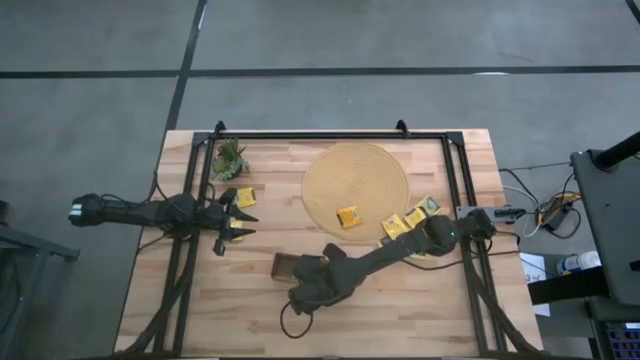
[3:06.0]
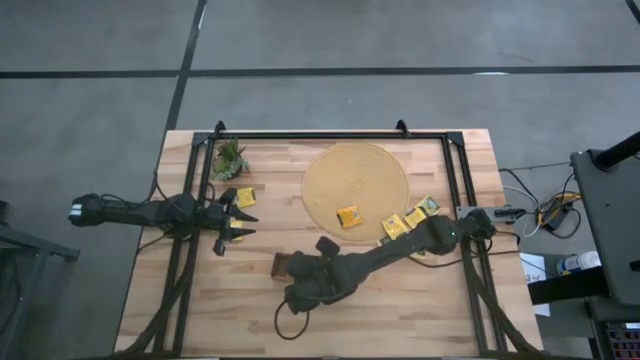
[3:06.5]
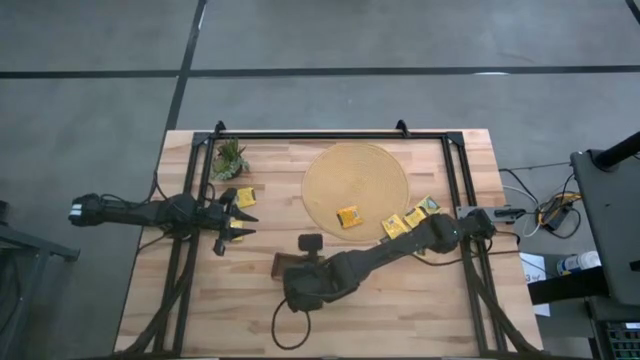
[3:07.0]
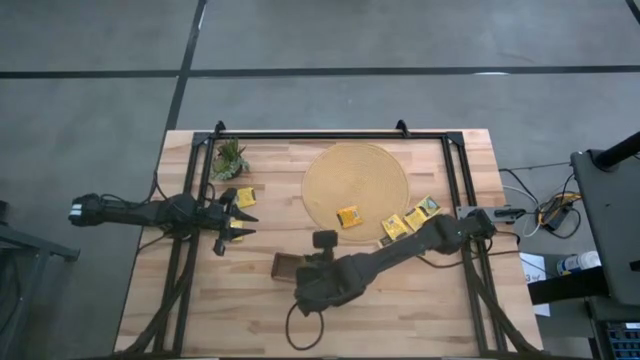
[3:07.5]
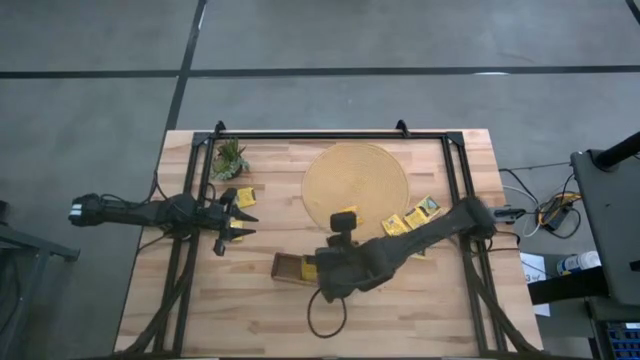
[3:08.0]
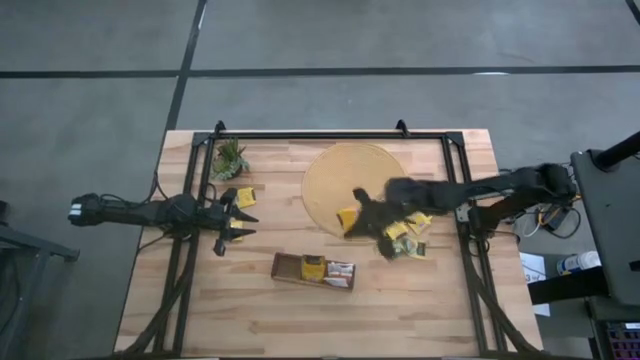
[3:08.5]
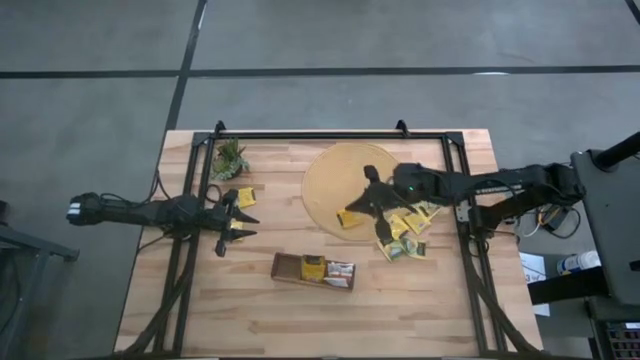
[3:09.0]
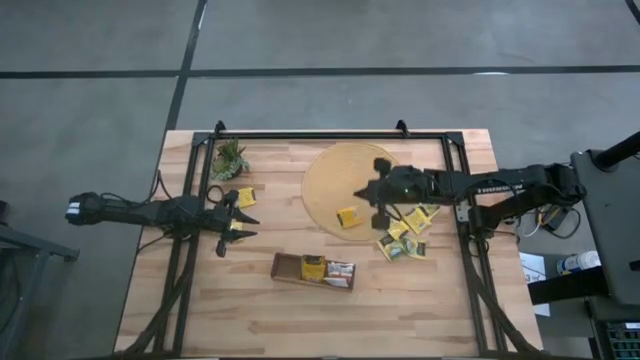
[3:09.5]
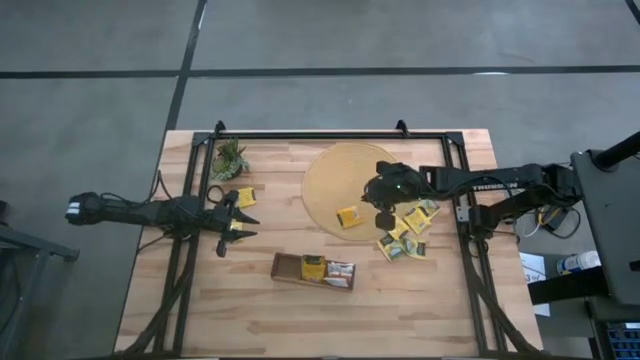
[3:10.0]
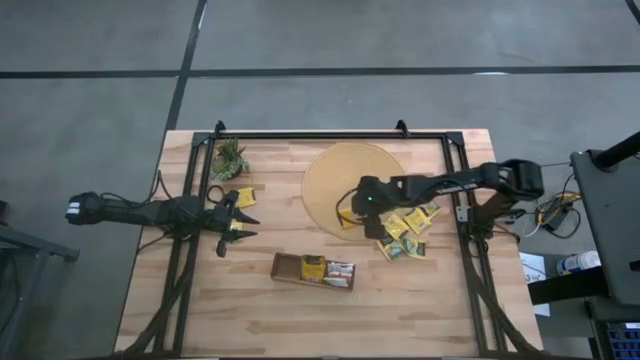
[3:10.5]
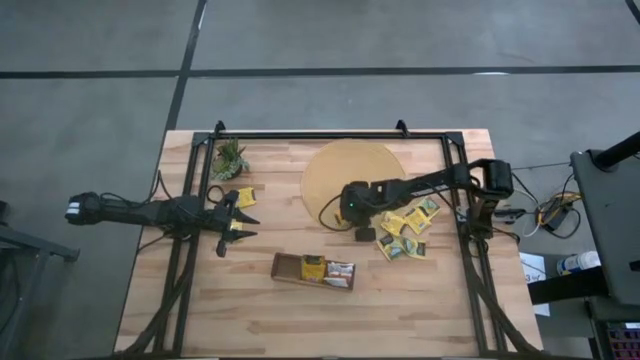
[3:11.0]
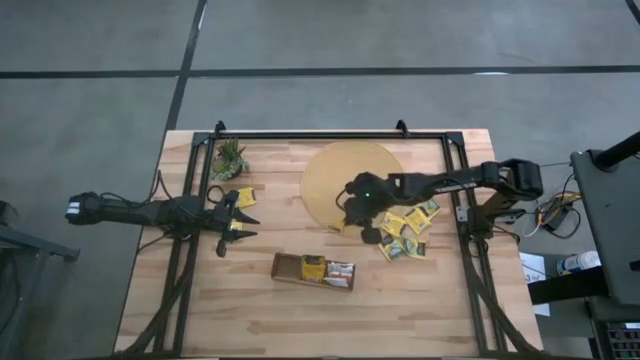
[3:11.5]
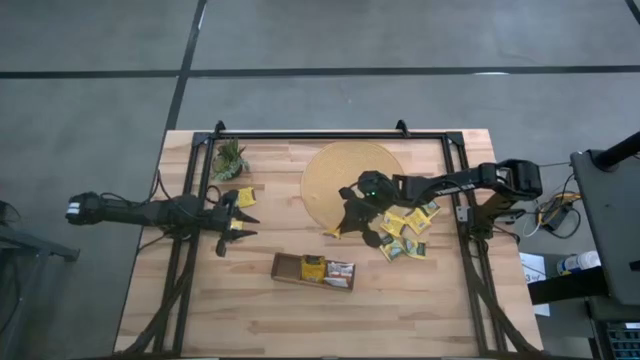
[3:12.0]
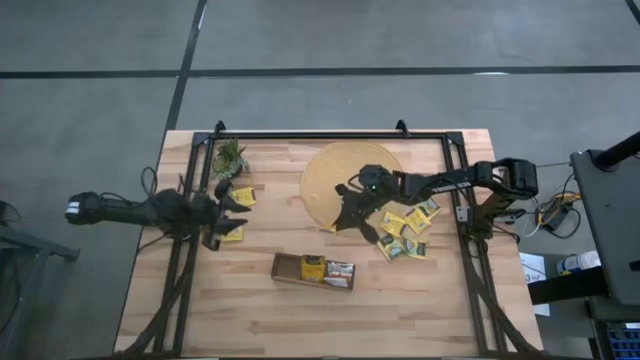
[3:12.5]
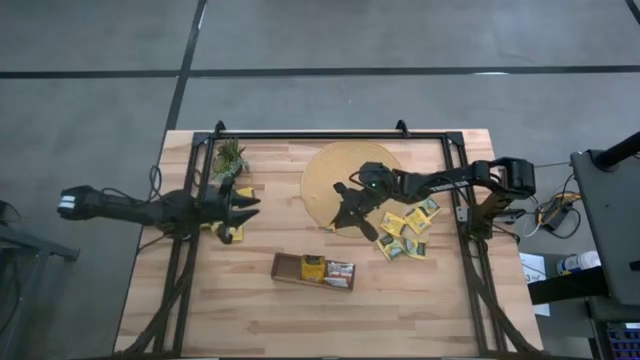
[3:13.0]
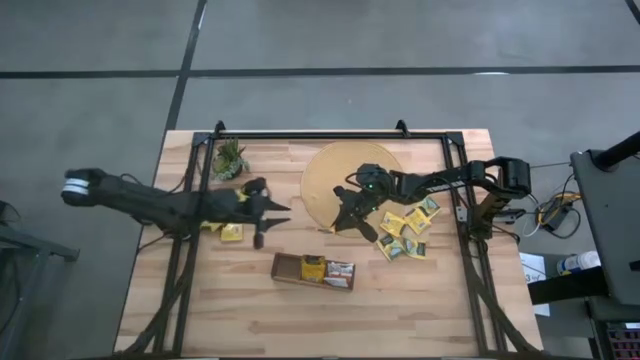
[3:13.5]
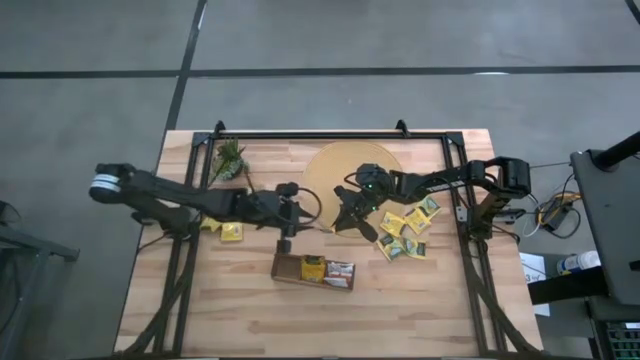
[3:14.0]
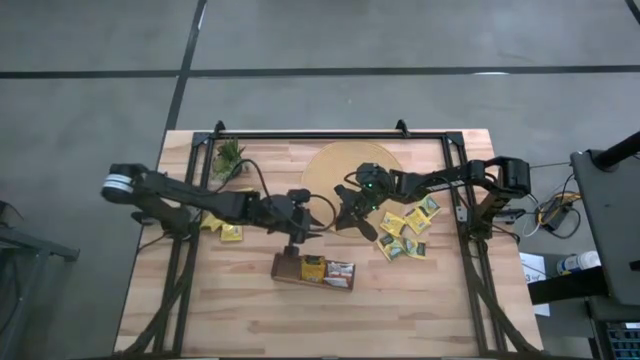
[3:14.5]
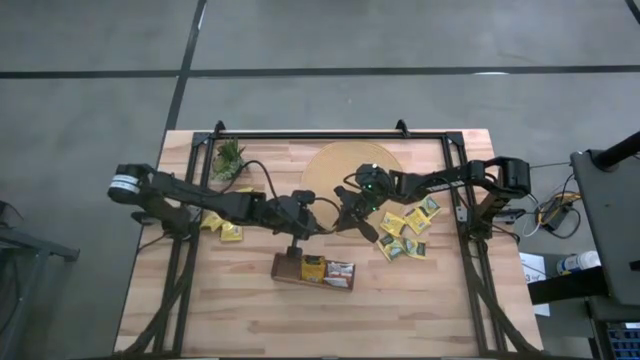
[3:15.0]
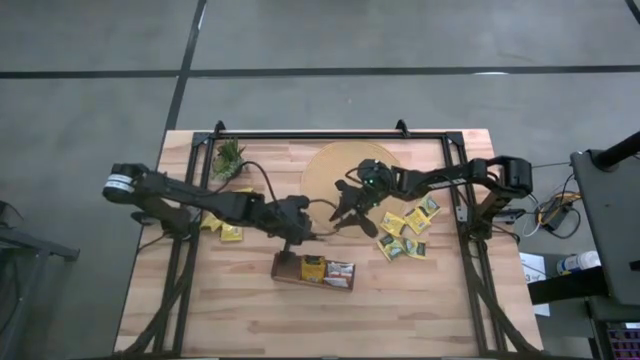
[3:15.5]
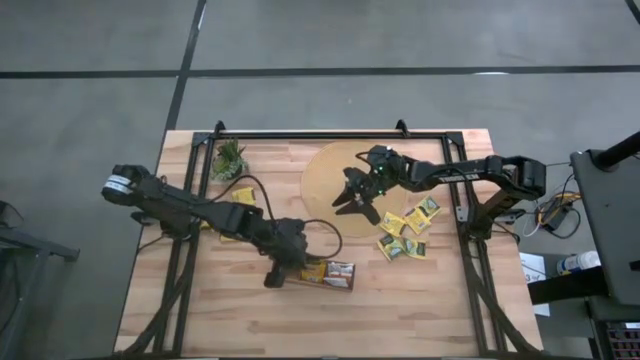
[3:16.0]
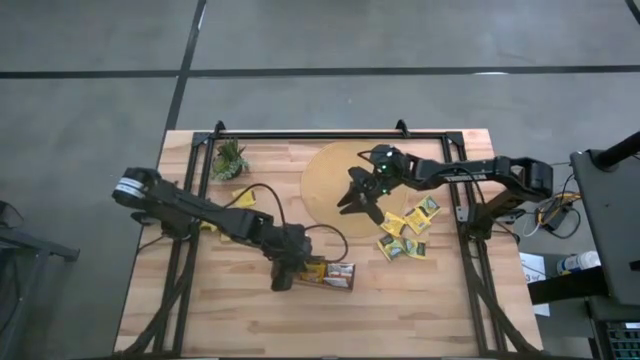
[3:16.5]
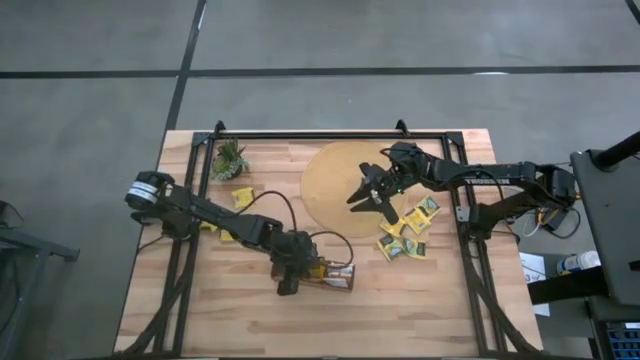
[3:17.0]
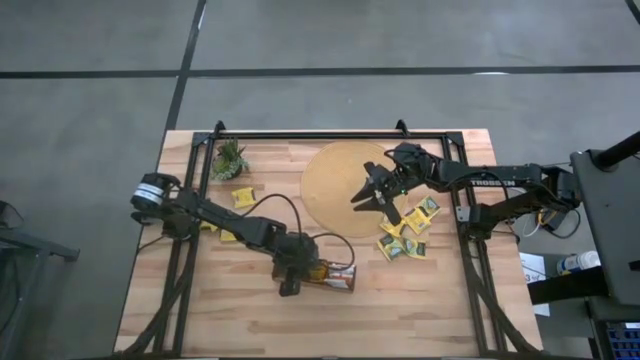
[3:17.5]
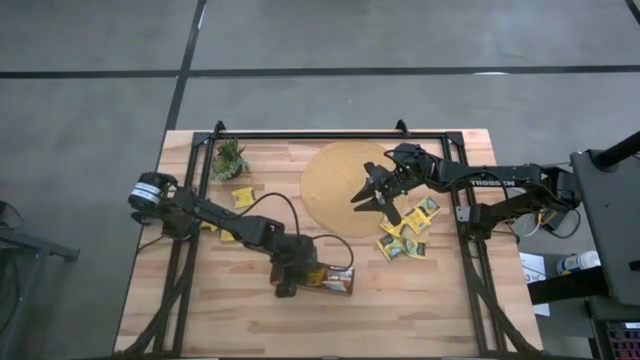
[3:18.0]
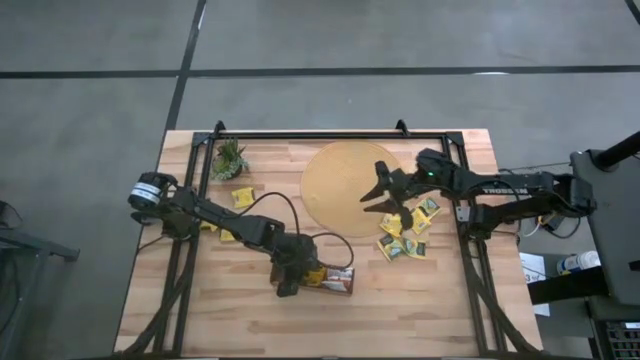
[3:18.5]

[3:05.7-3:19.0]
Task: Pick & Place Tea
Put the orange tea bag into the middle section of the wooden organizer
